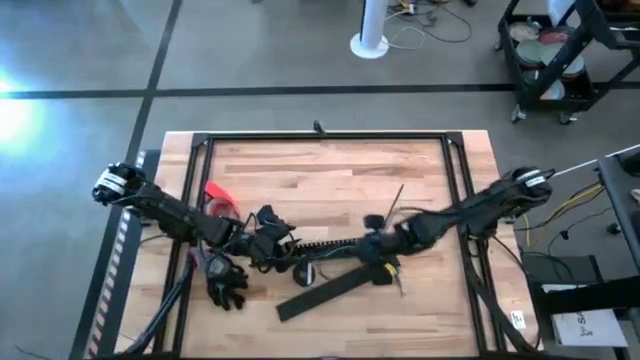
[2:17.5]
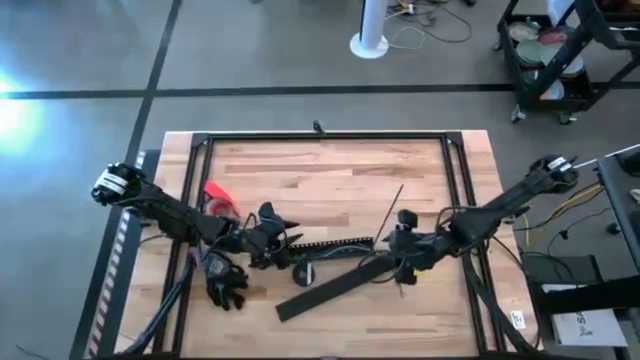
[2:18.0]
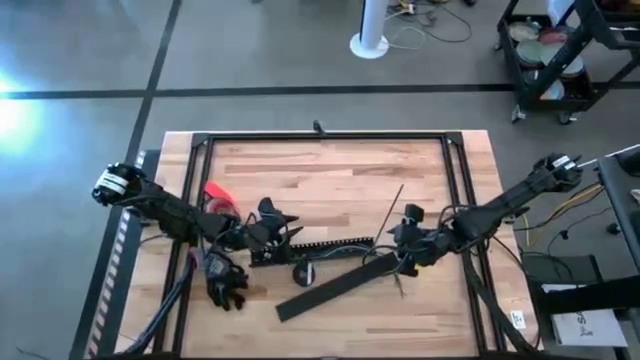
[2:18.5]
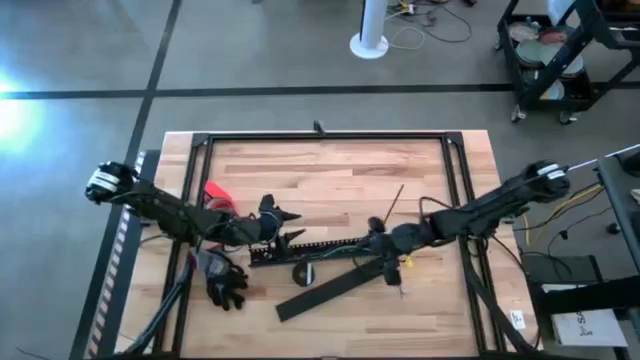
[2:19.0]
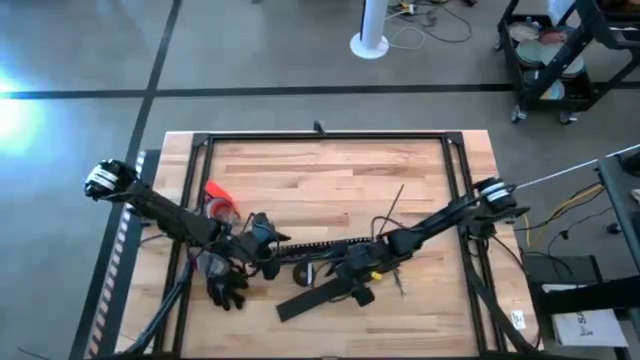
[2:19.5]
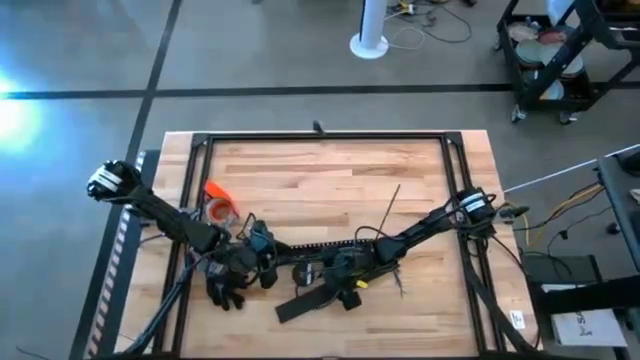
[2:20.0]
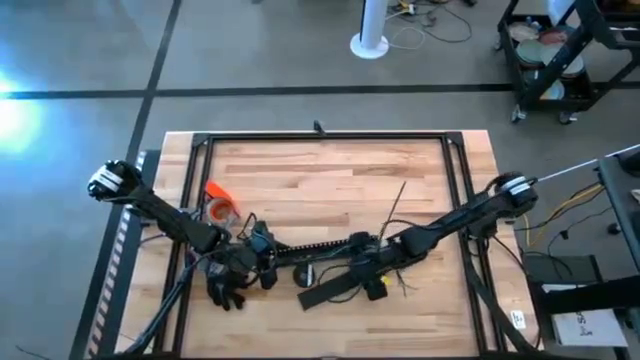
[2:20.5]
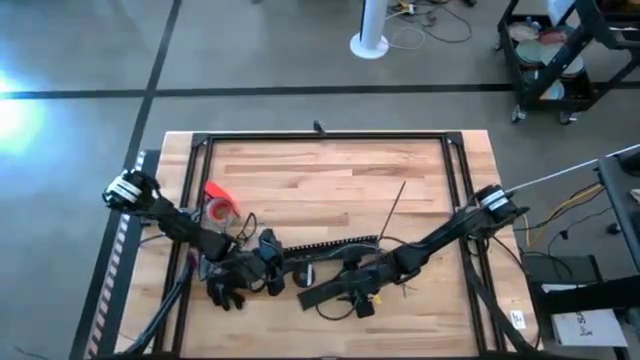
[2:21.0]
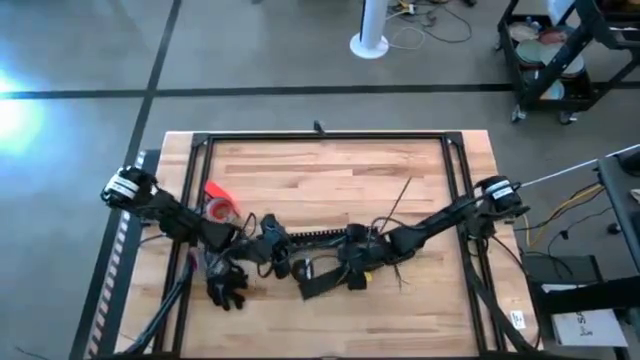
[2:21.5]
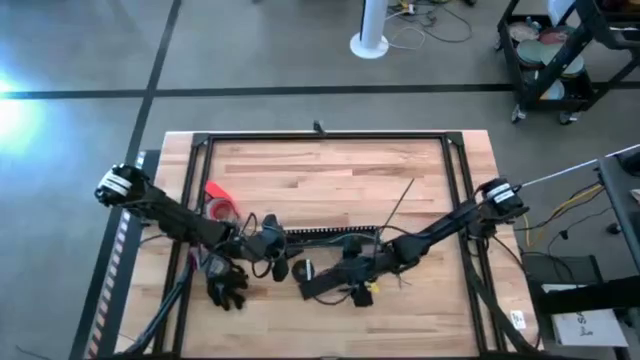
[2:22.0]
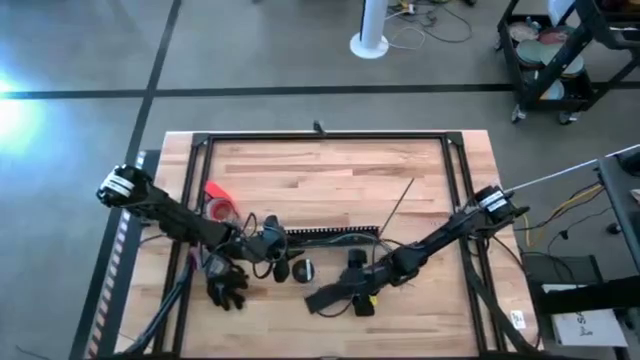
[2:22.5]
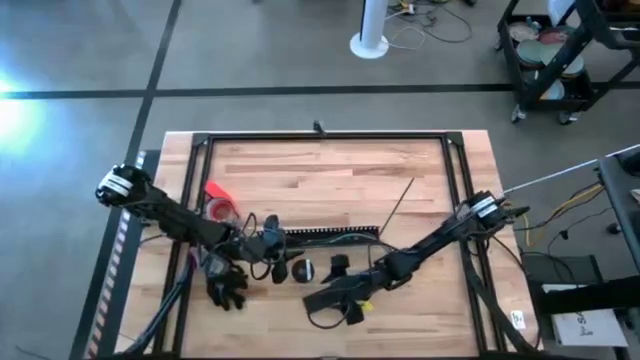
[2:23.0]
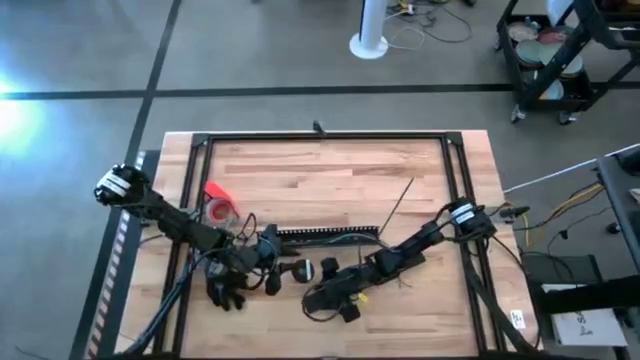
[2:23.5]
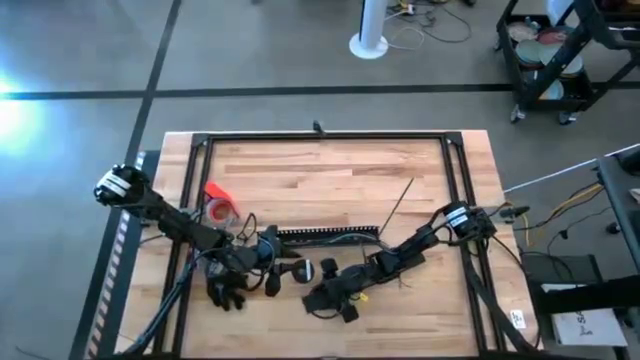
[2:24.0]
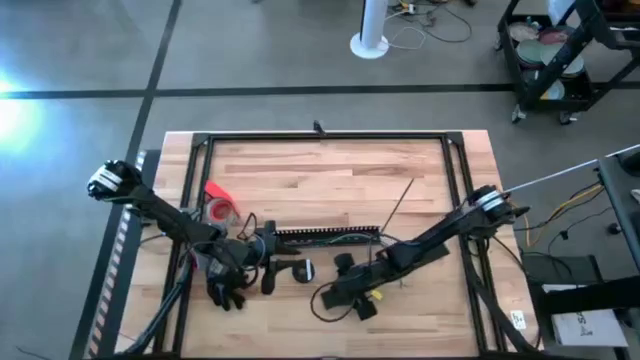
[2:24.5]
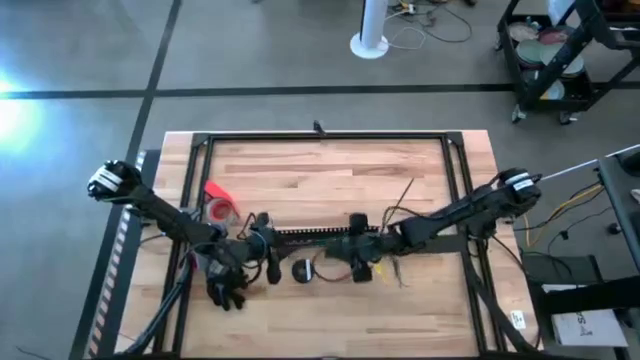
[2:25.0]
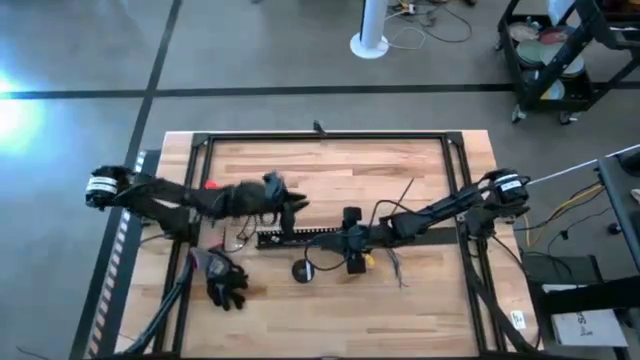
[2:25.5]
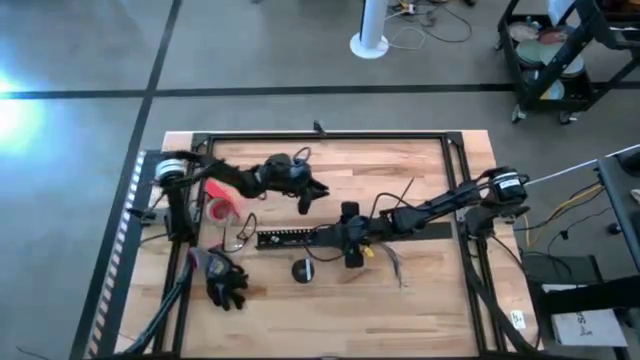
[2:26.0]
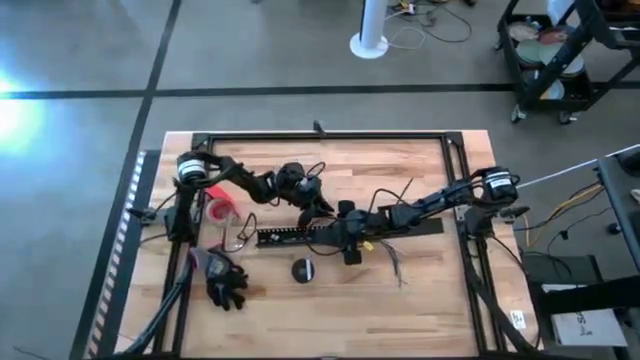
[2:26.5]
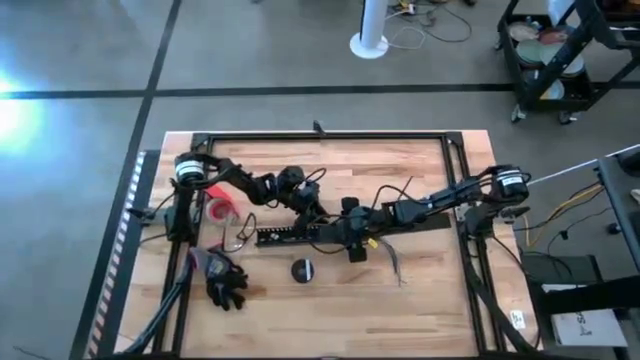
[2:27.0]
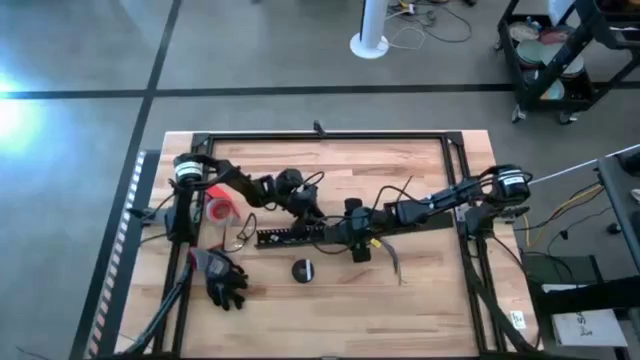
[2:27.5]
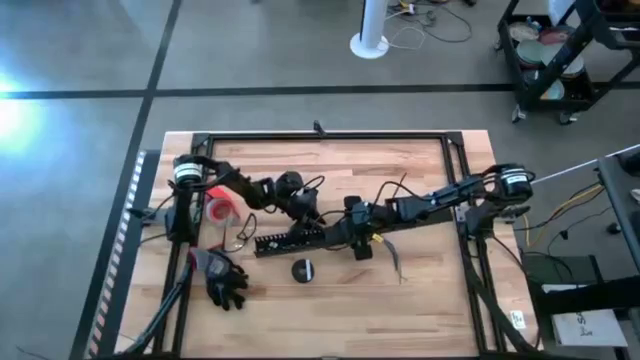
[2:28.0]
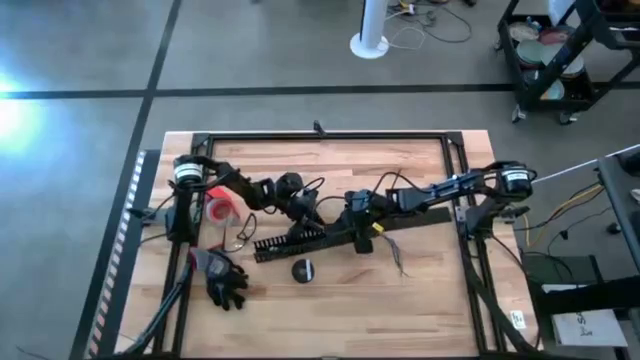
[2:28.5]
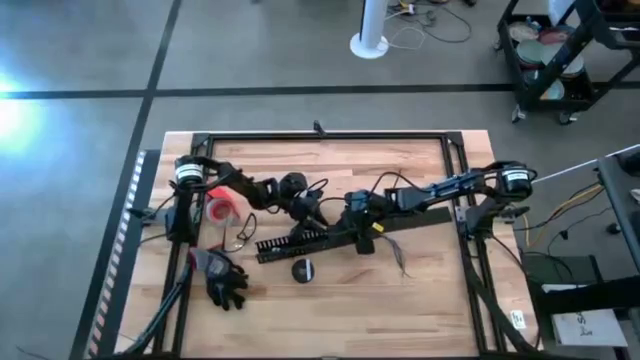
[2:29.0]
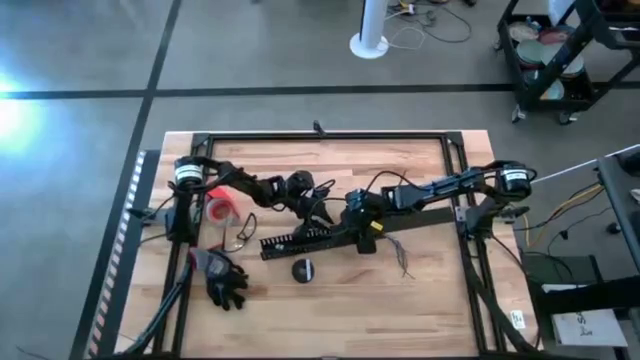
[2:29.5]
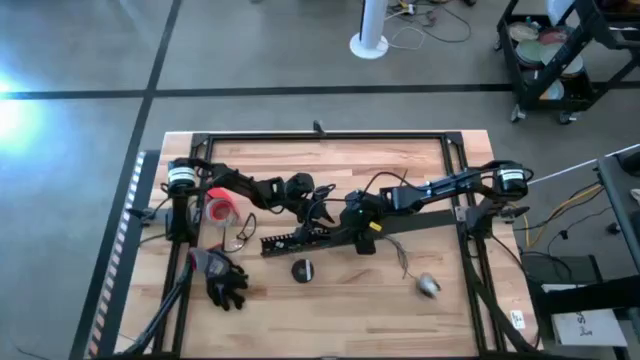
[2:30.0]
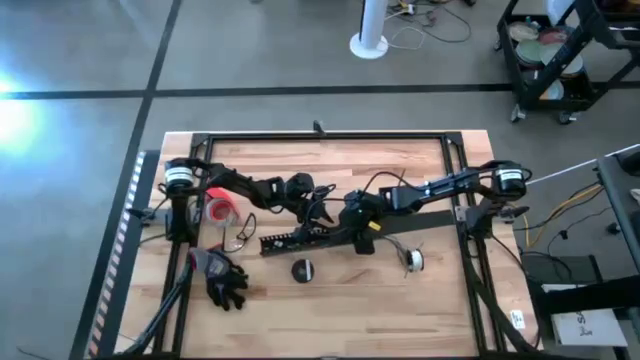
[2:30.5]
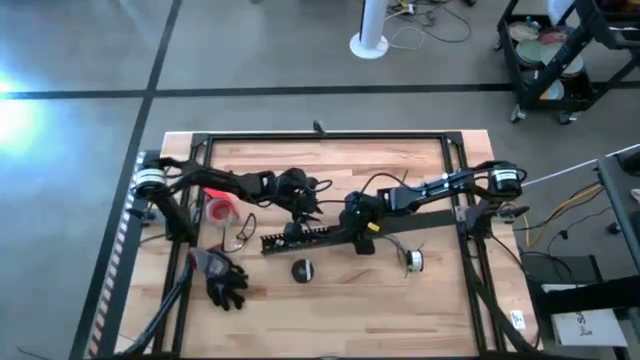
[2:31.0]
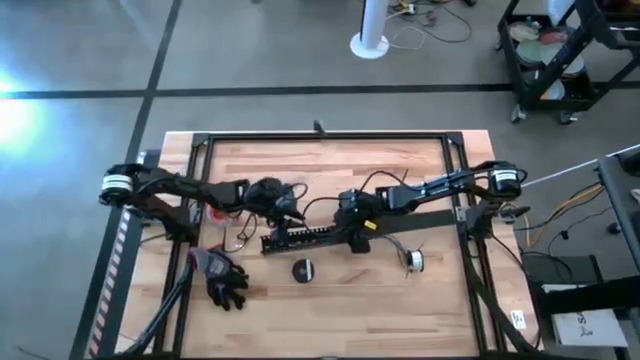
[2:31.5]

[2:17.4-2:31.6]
Task: Ziptie cables
Close the black cable duct

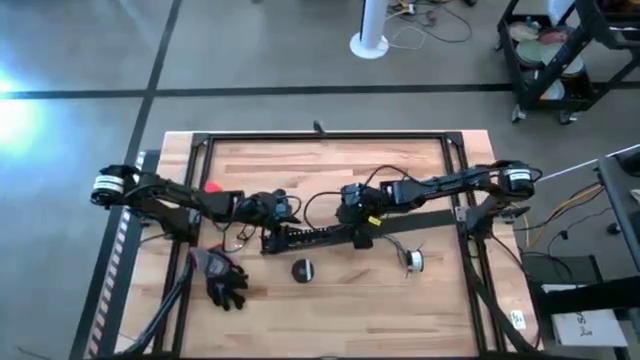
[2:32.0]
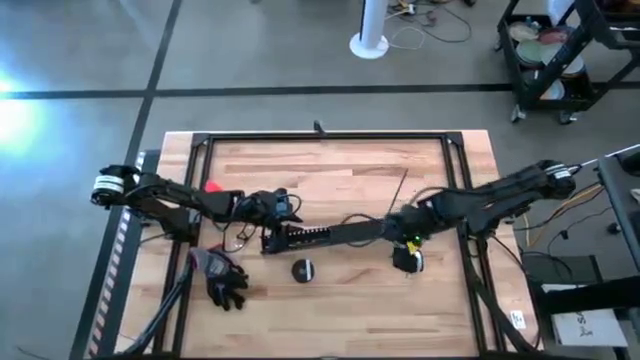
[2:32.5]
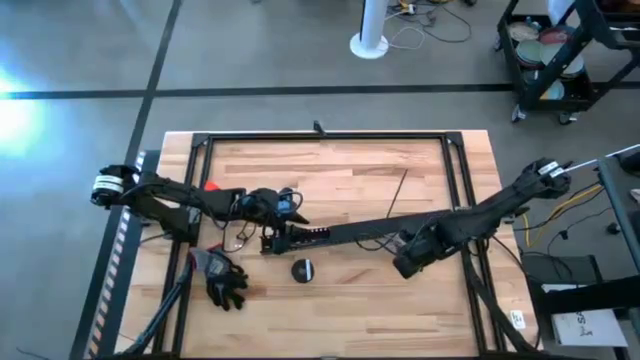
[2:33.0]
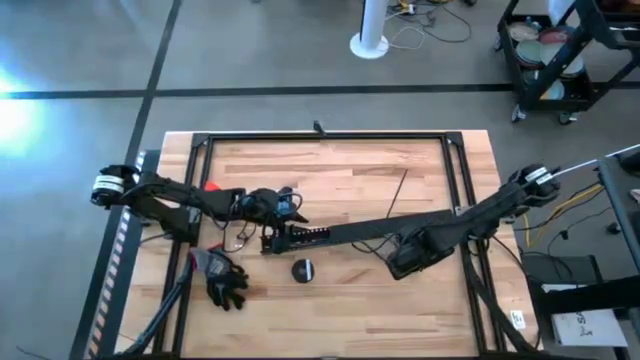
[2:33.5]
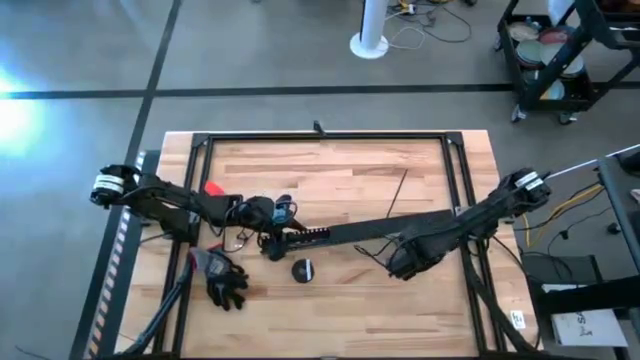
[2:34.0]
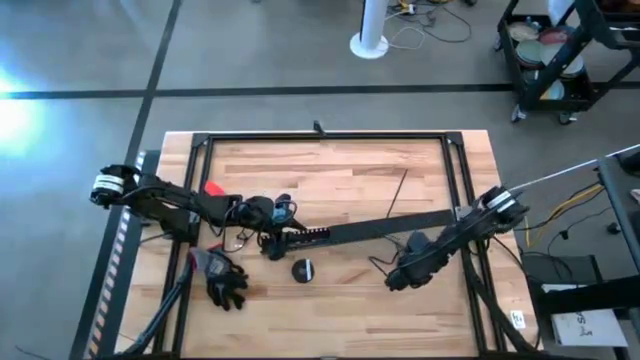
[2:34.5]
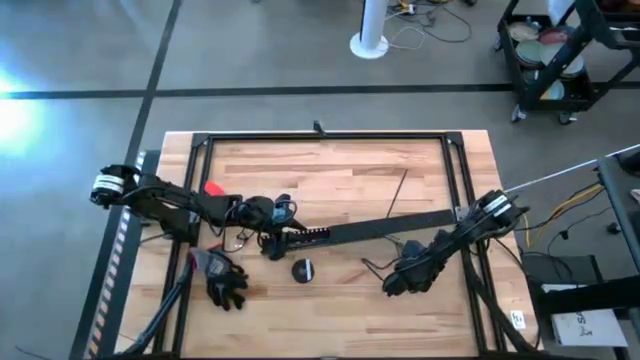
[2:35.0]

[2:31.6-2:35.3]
Move the coiled white wire to the middle right of the table

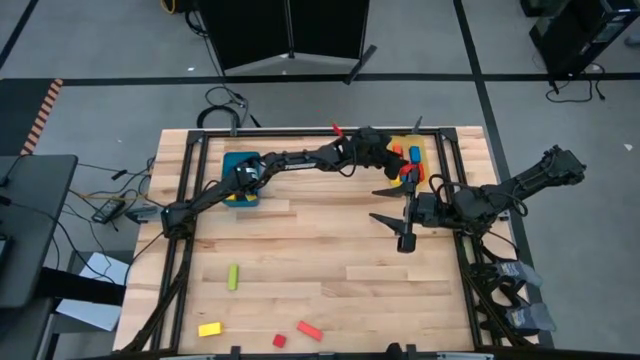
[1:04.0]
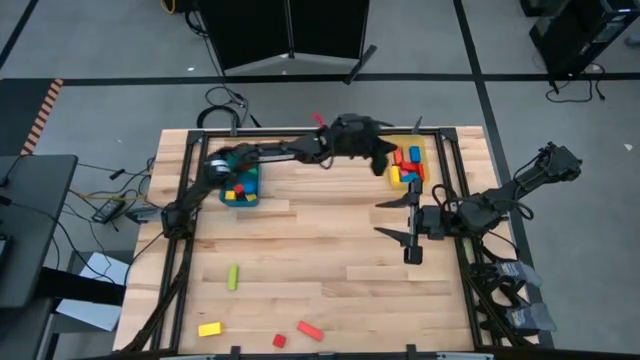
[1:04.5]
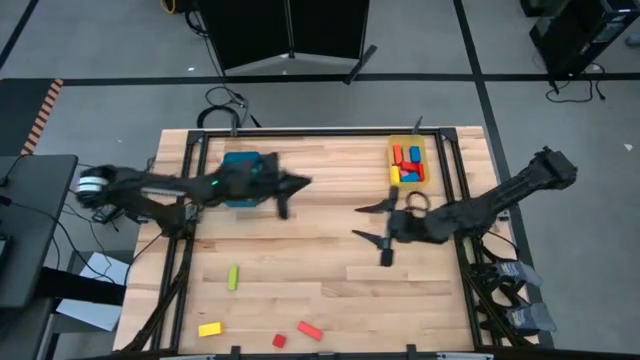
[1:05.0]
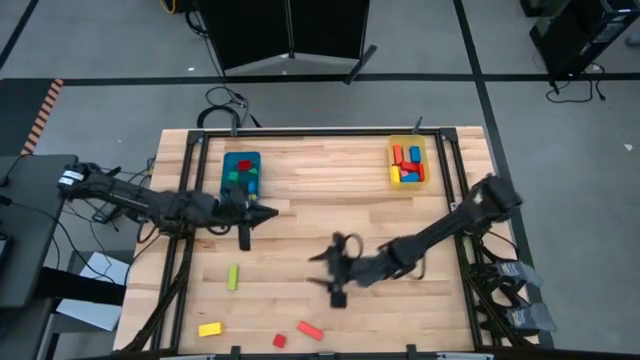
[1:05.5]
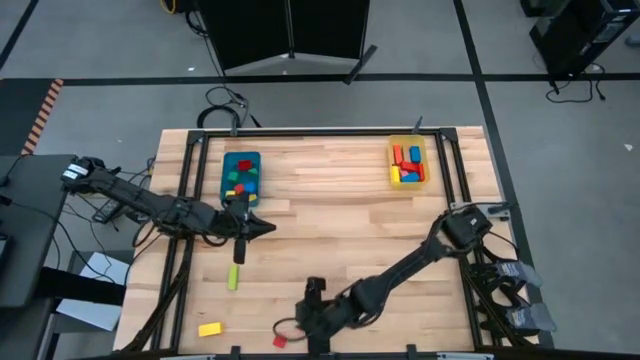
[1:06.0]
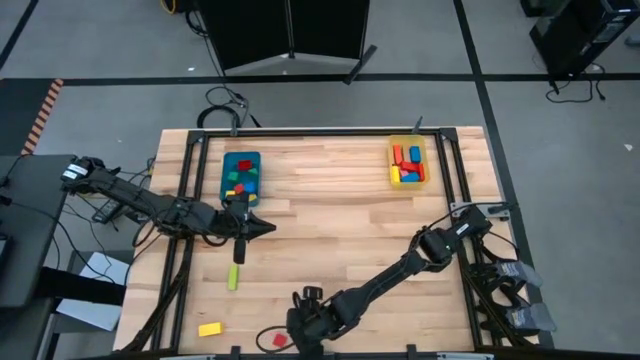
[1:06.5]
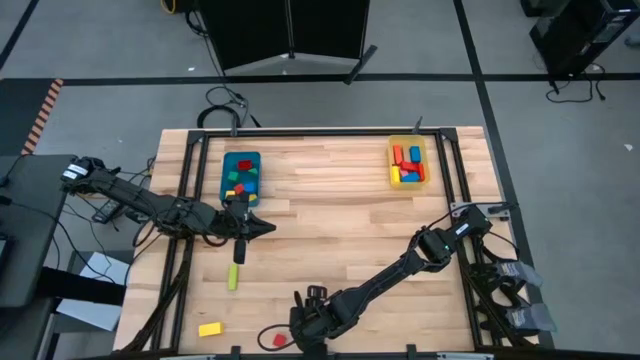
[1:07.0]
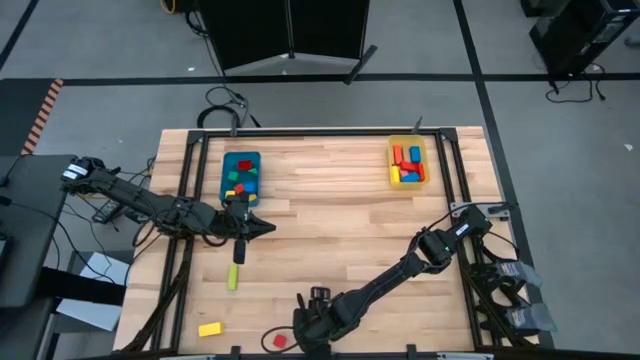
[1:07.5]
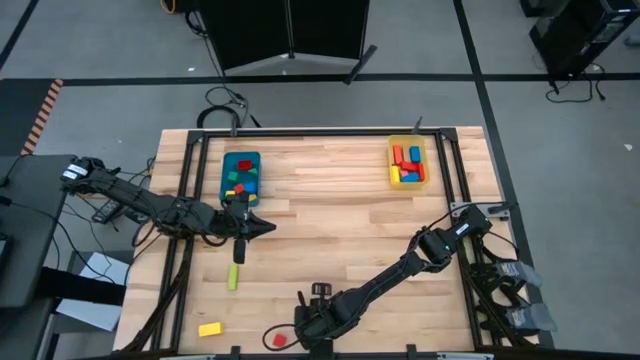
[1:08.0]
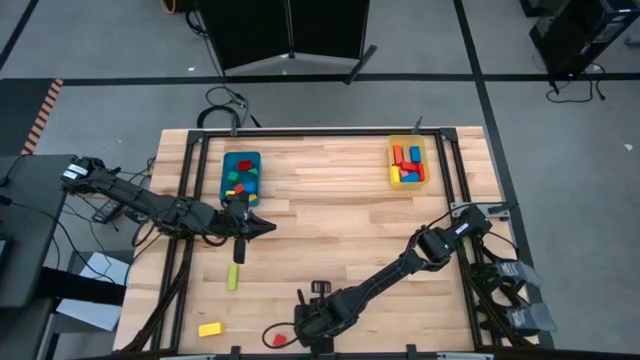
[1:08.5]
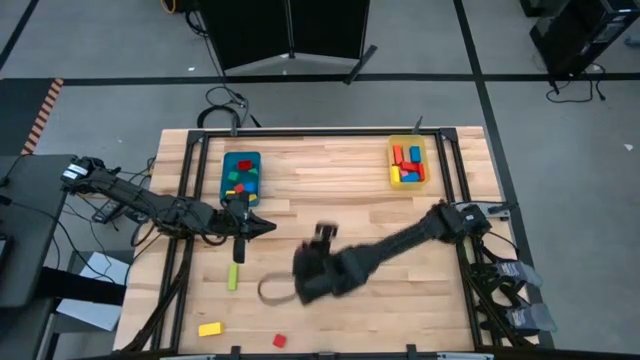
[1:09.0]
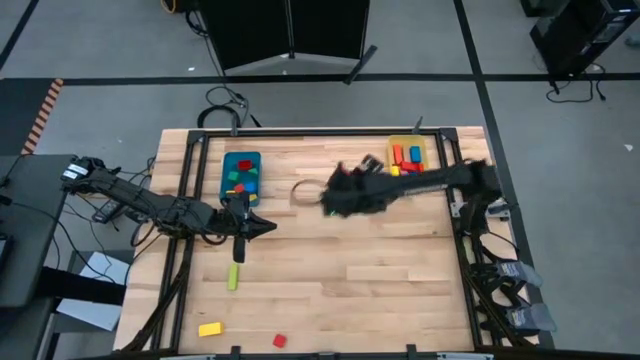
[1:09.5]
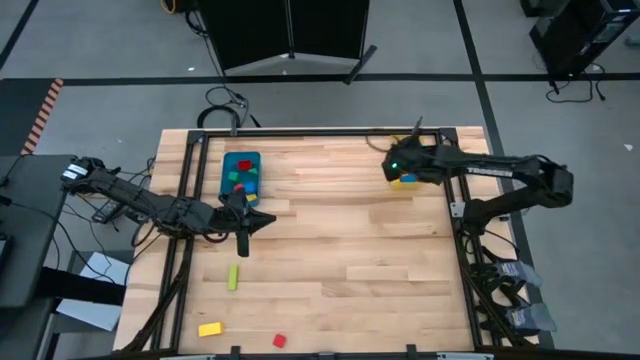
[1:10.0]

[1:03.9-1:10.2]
Task: Sort blocks by size
Put the large light orange block into the yellow bin
